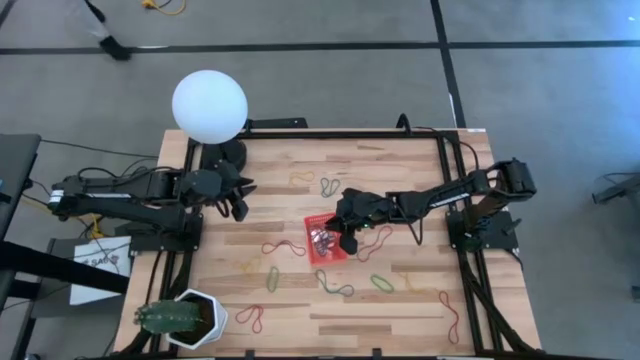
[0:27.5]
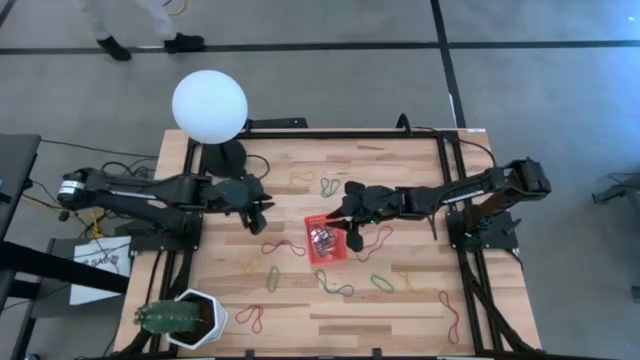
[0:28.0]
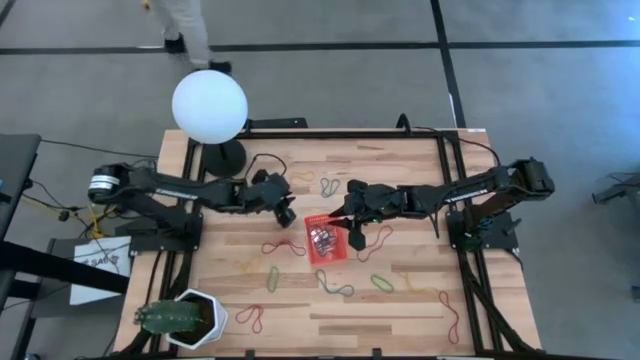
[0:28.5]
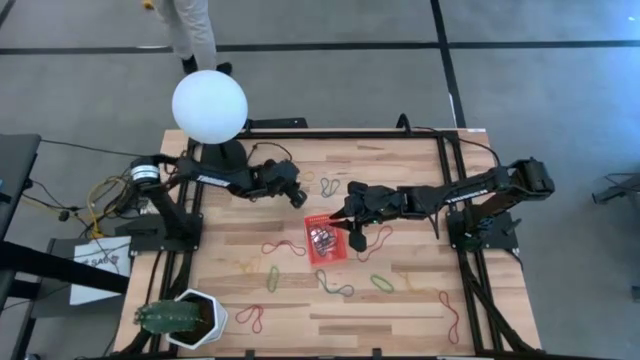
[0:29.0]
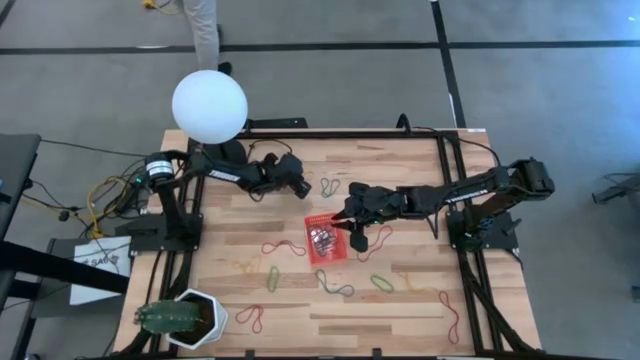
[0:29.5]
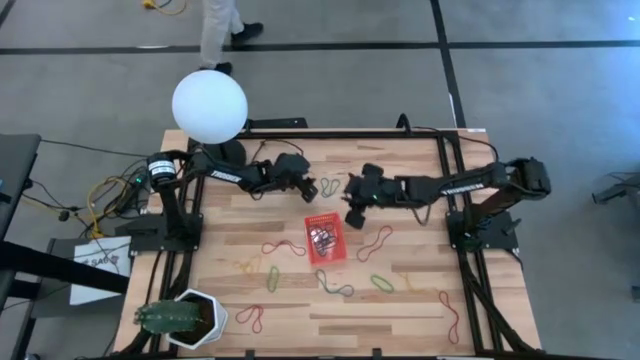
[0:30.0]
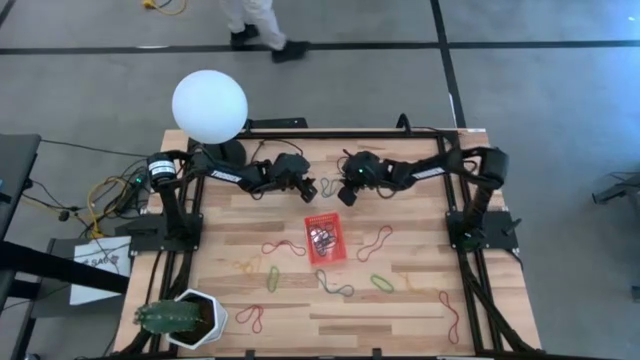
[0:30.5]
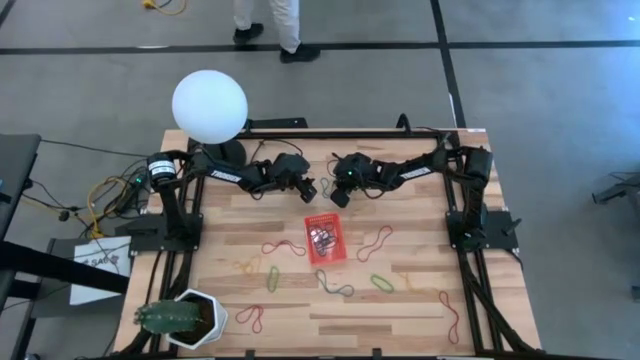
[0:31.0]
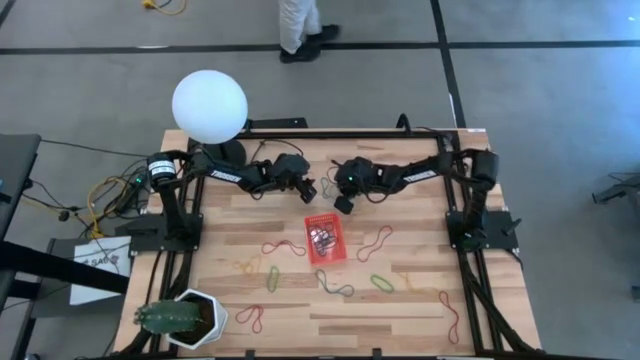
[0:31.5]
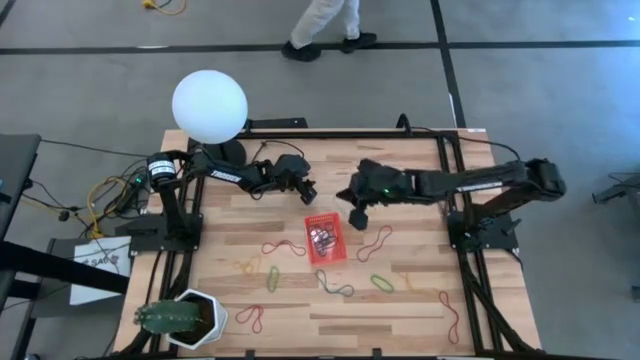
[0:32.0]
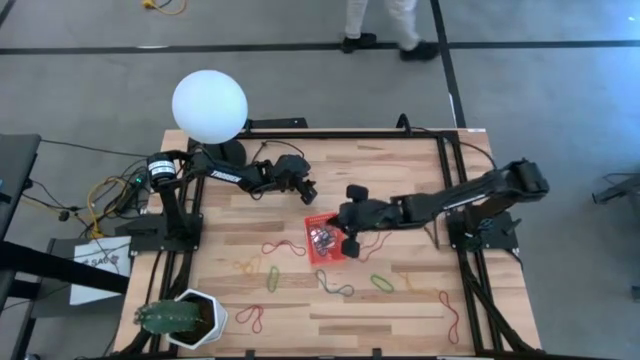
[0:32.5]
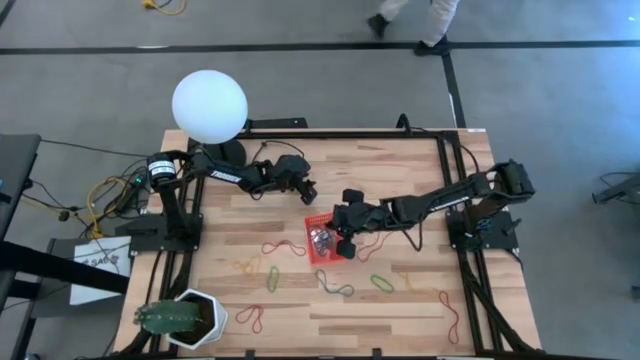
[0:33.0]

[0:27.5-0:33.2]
Task: Pick and place items into bin
Put the blue rubber band into the orange bin

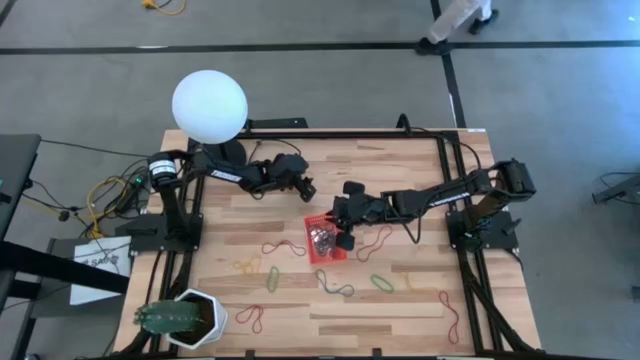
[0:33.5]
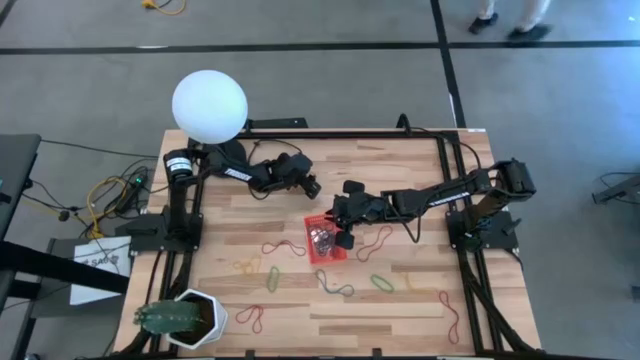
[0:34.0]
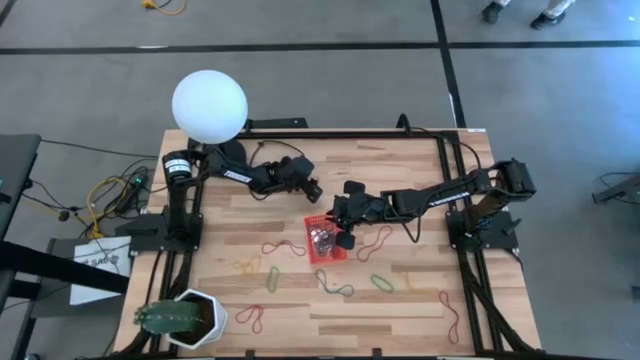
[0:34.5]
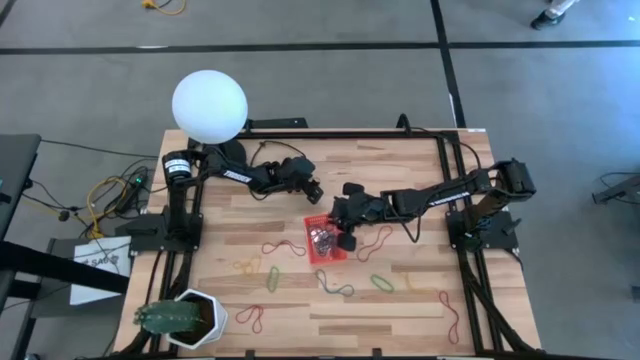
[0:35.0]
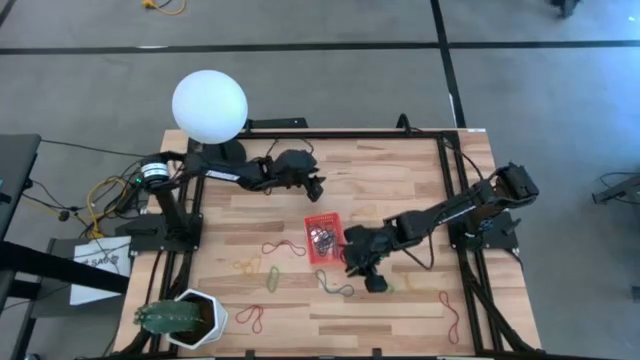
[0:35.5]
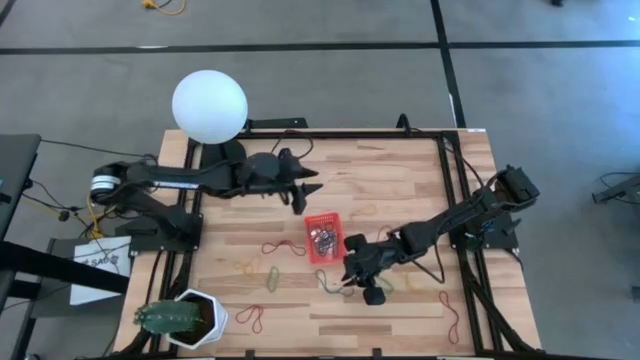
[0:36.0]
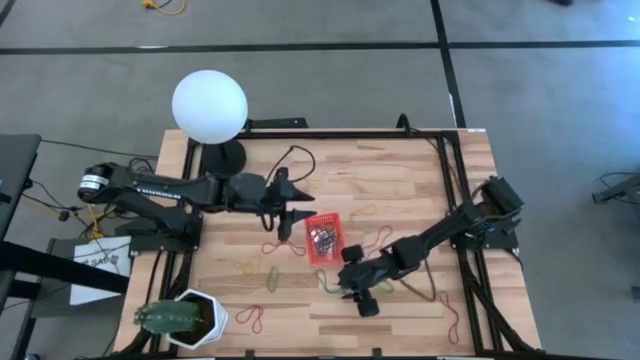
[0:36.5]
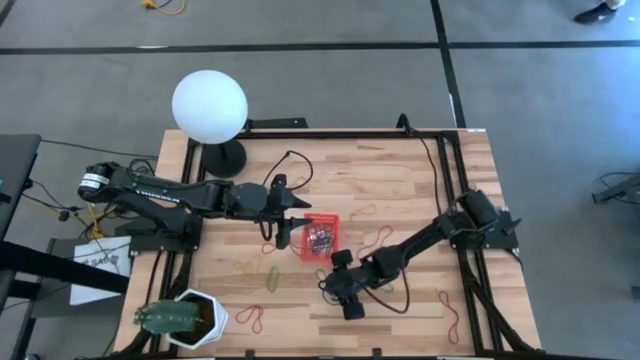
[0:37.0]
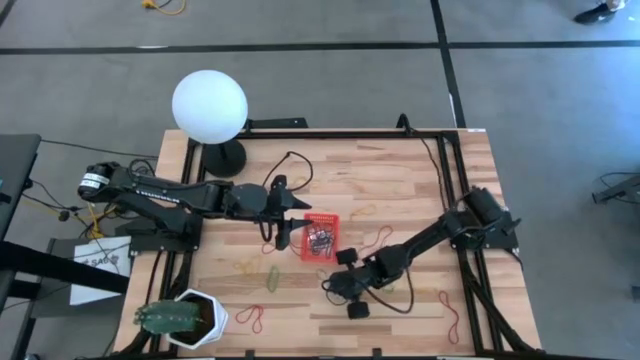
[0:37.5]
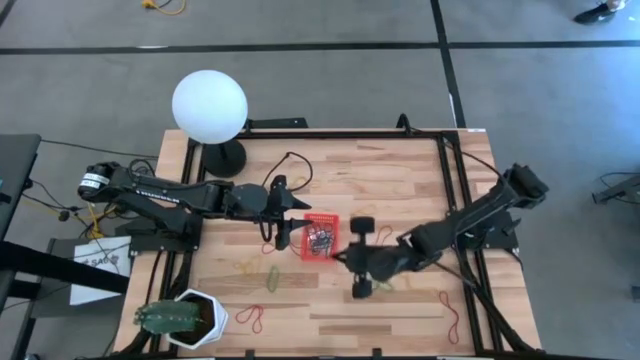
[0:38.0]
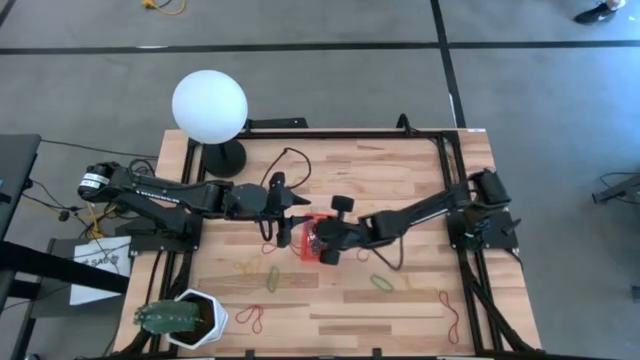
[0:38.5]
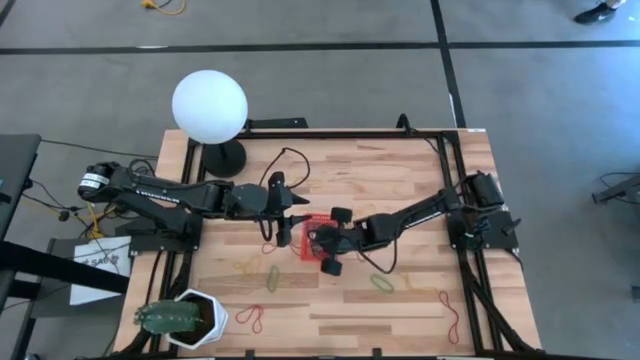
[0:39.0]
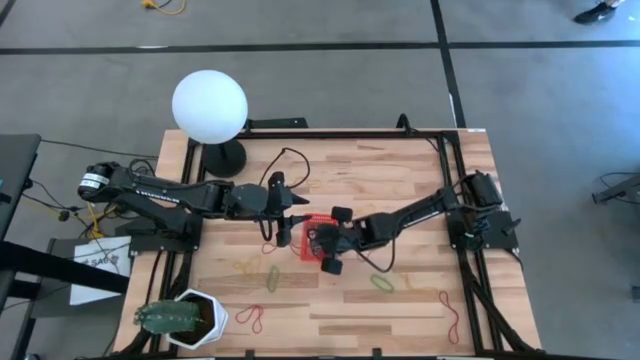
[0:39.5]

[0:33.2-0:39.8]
Put the blue rubber band into the orange bin

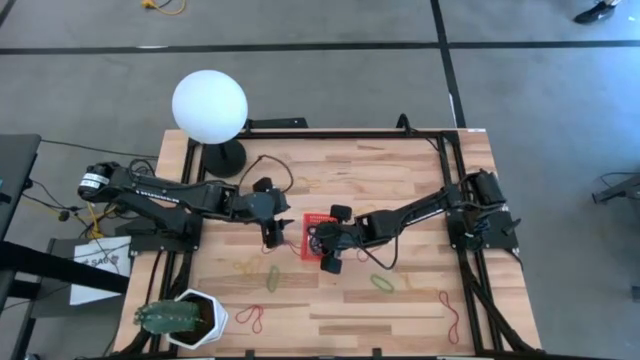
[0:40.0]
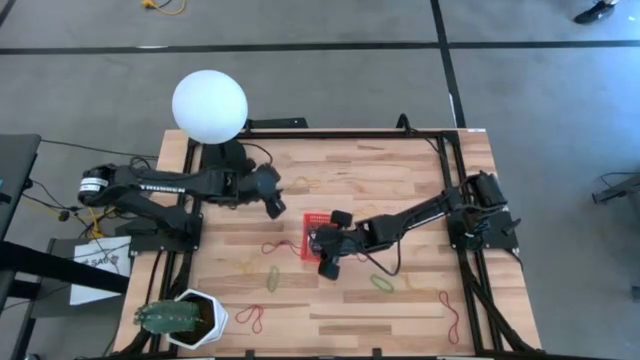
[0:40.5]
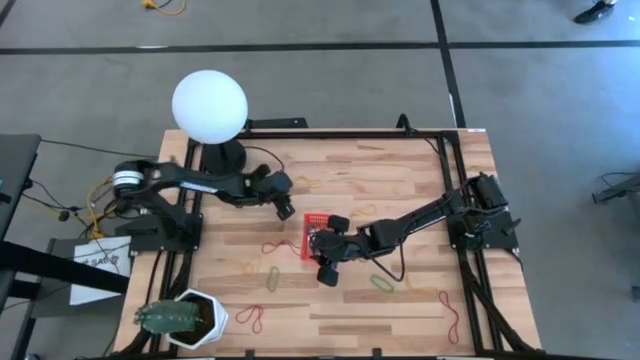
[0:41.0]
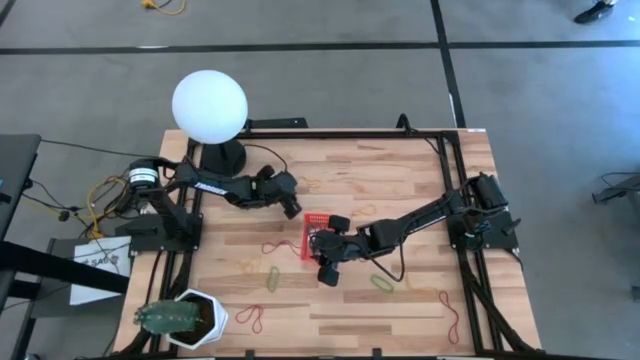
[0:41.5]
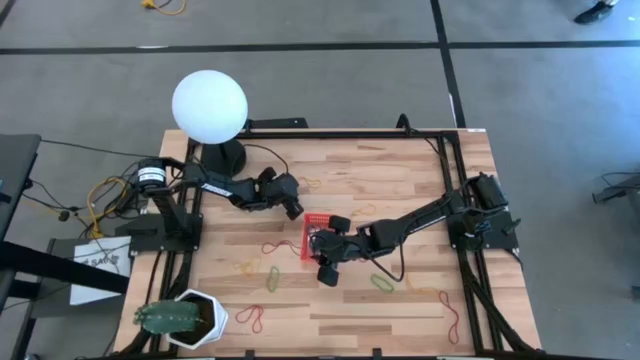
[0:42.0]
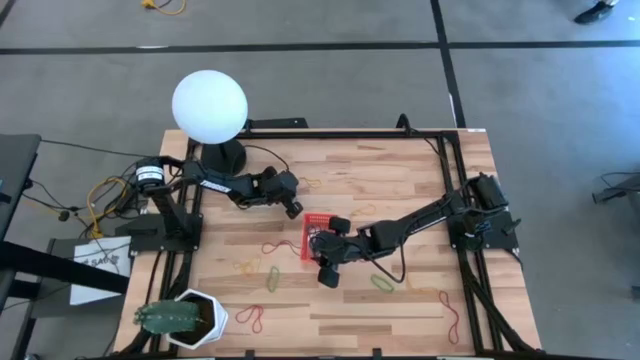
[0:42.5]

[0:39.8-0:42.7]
Put the yellow rubber band into the orange bin

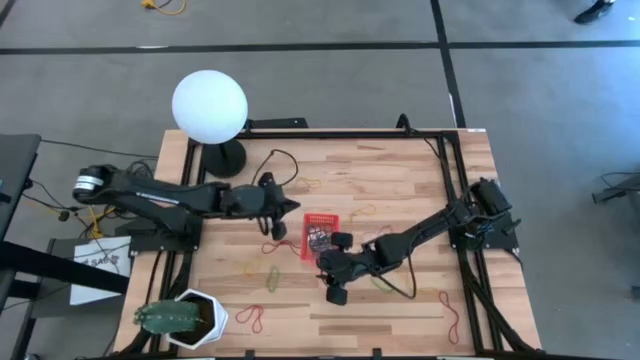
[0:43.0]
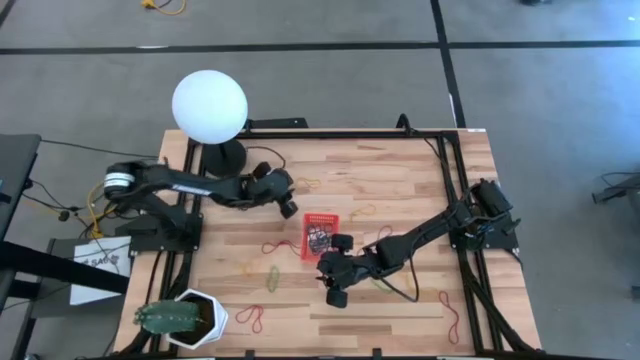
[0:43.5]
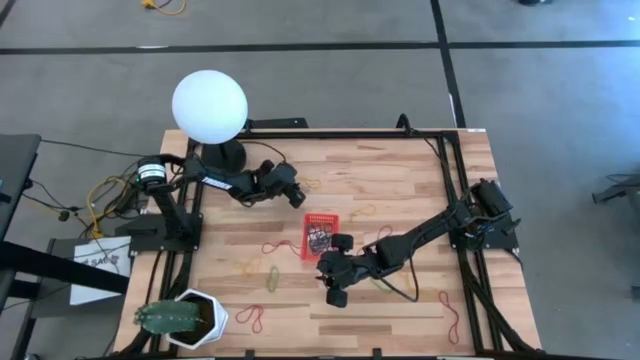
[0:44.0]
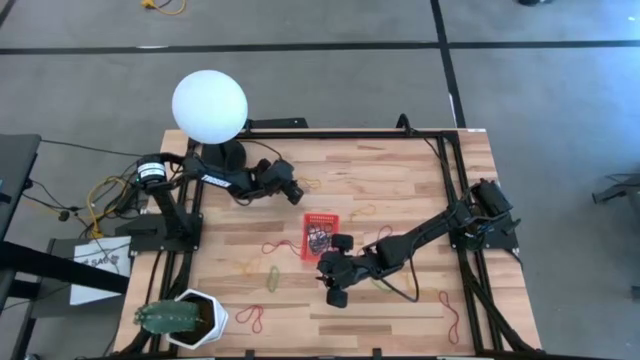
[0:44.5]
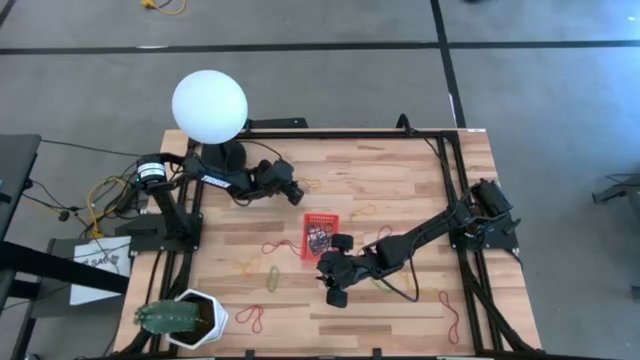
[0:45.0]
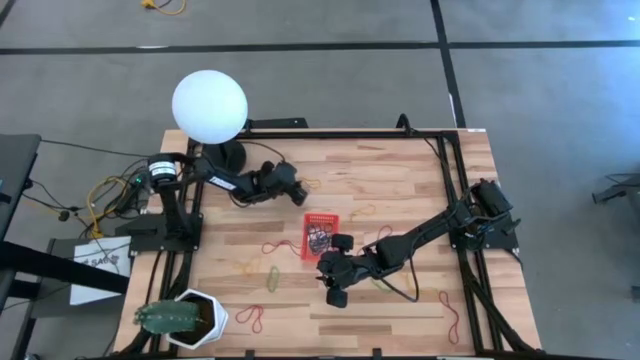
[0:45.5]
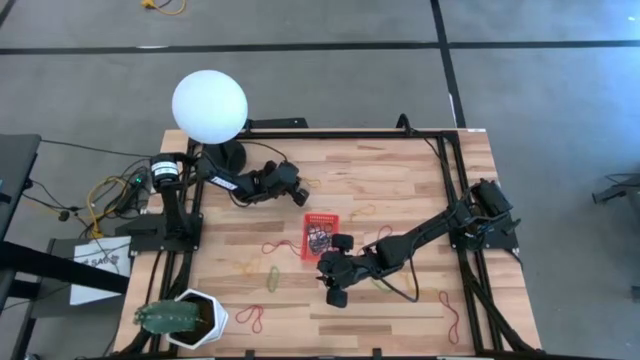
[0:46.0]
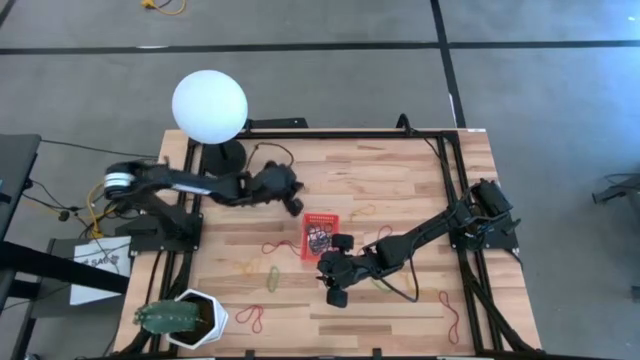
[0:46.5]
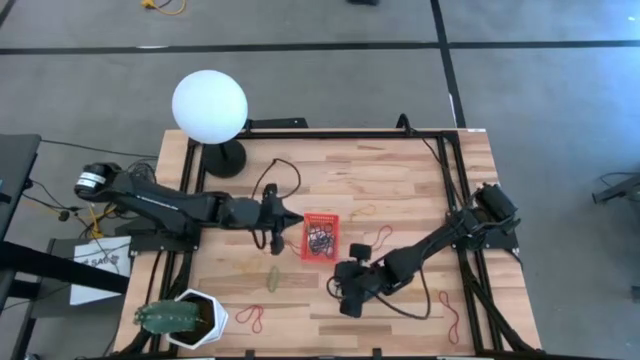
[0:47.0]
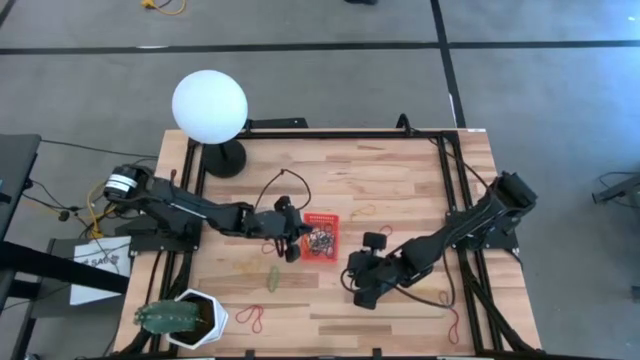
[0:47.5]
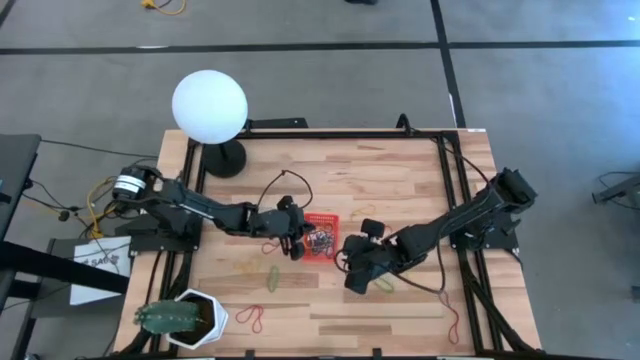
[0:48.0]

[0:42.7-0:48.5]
Put the yellow rubber band into the orange bin
